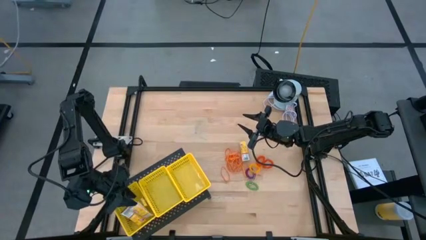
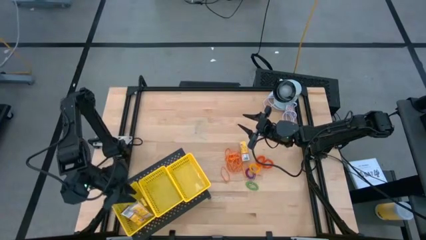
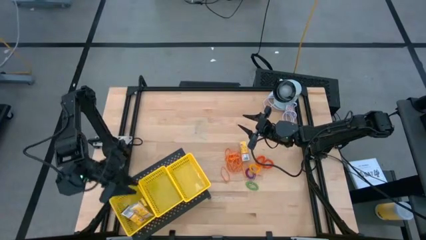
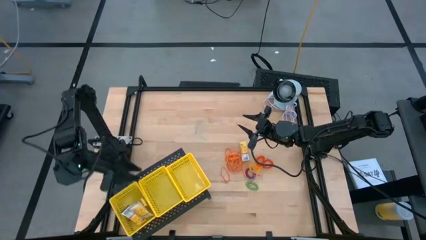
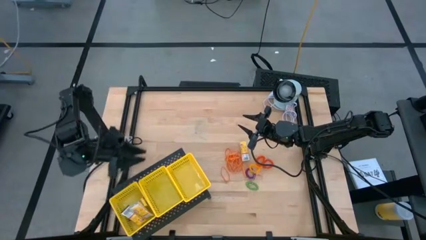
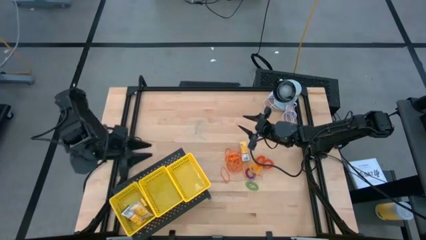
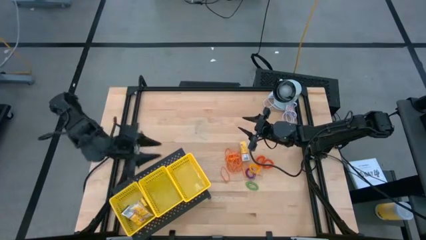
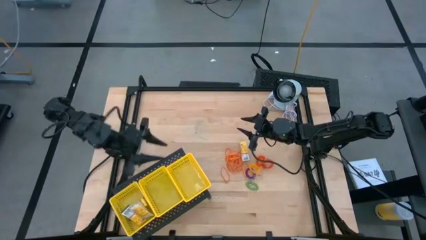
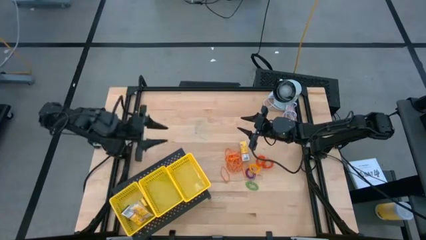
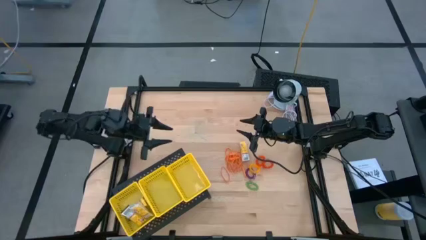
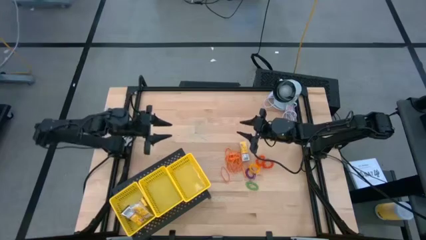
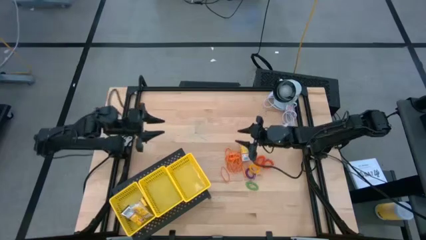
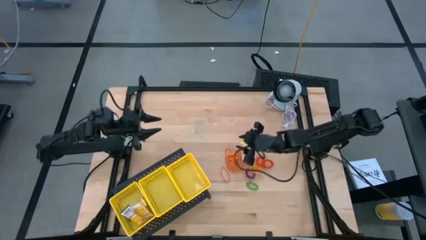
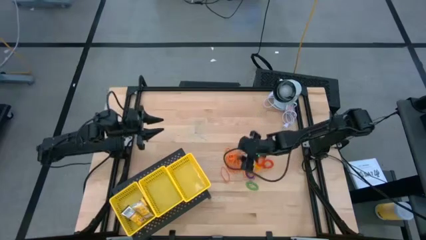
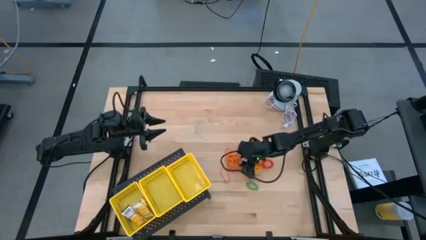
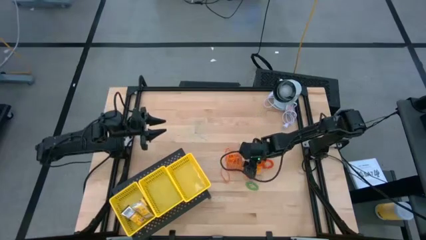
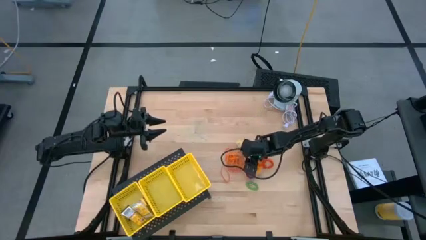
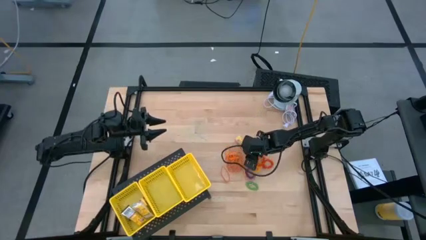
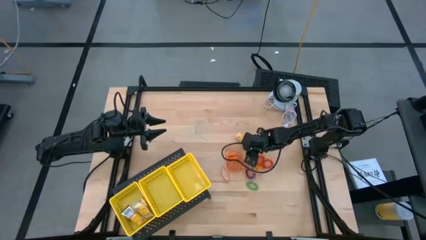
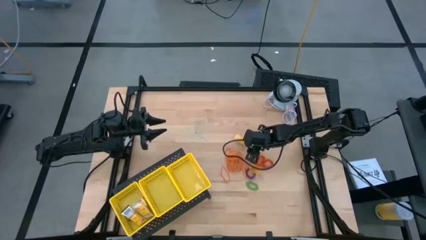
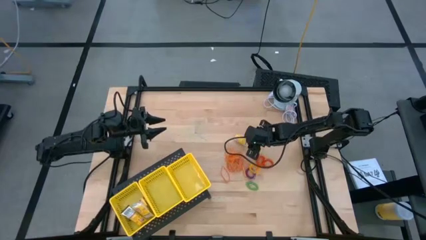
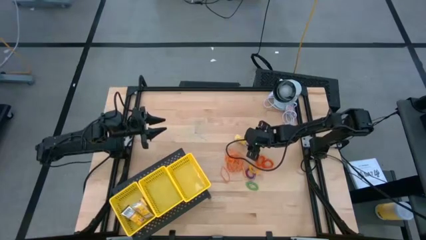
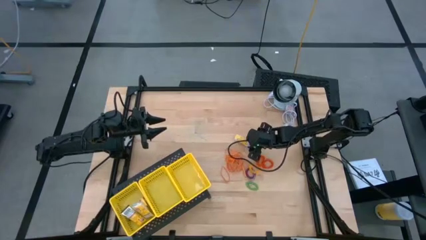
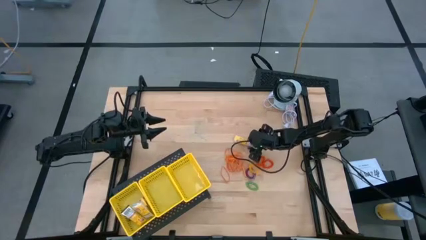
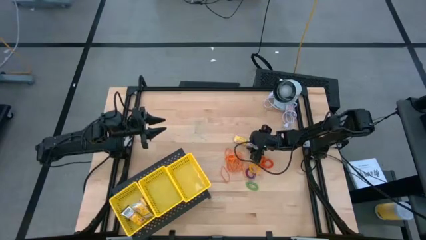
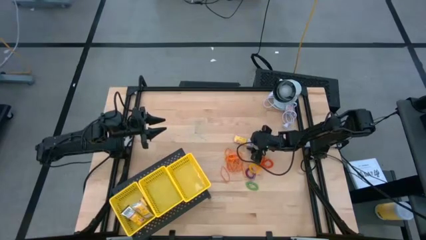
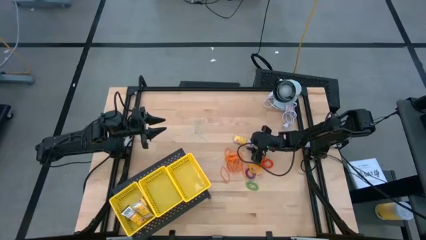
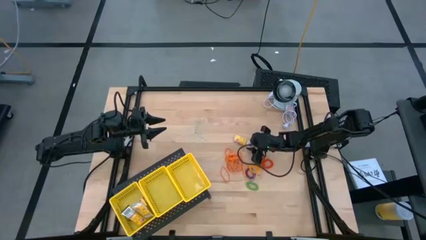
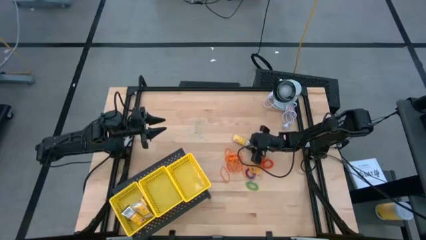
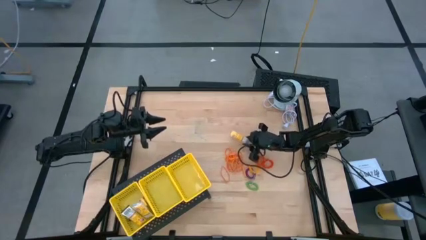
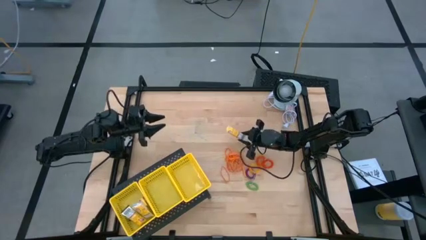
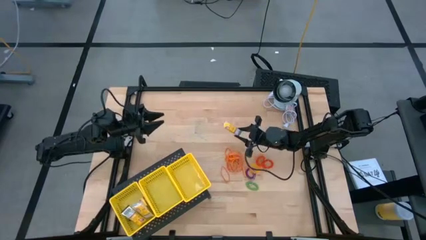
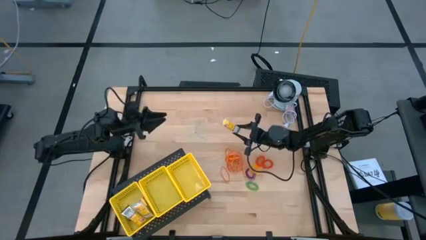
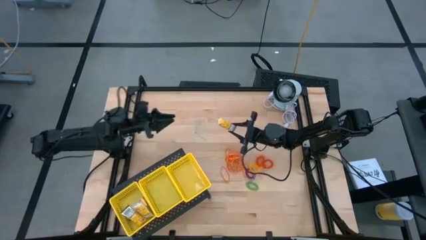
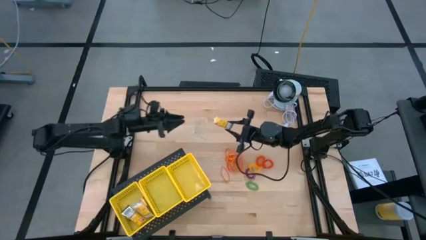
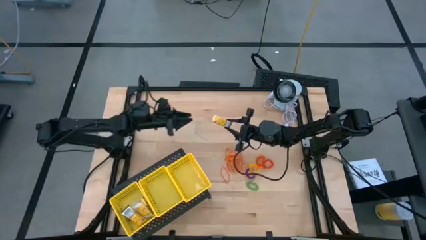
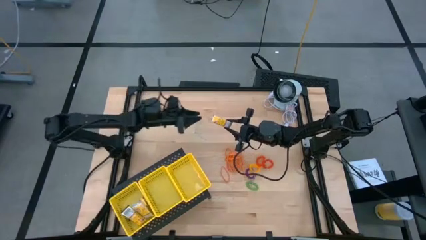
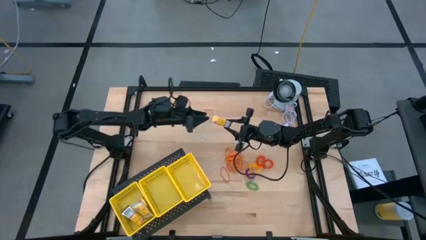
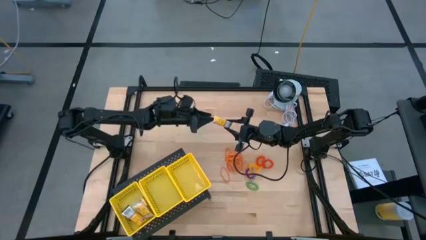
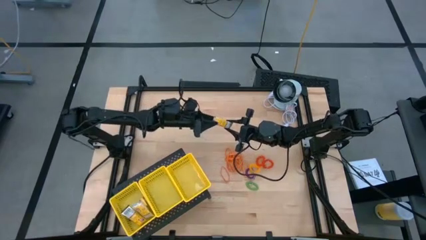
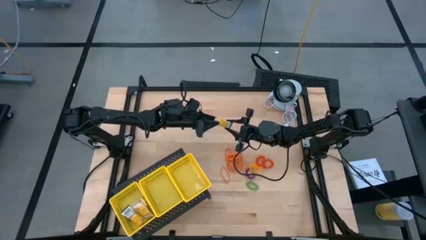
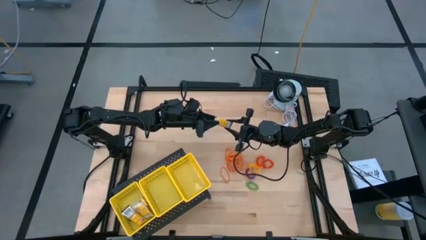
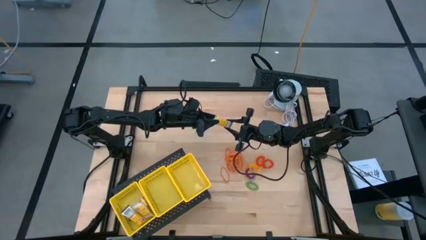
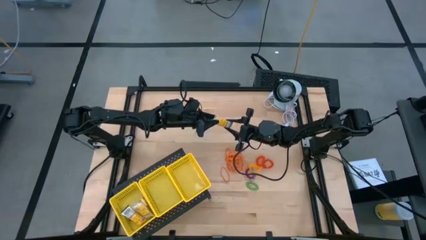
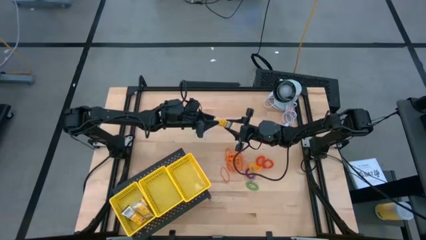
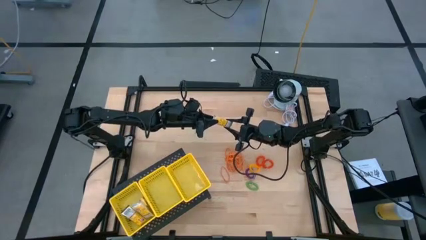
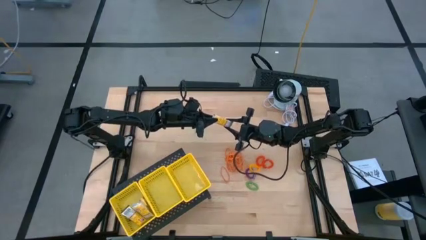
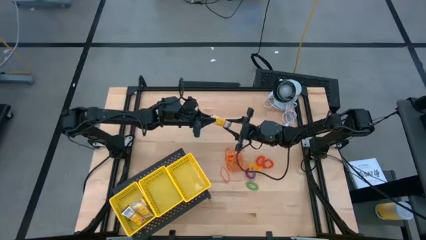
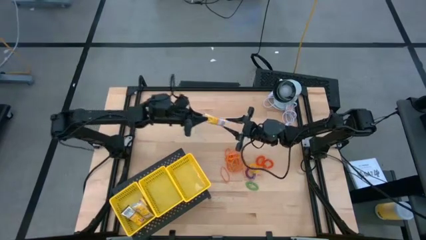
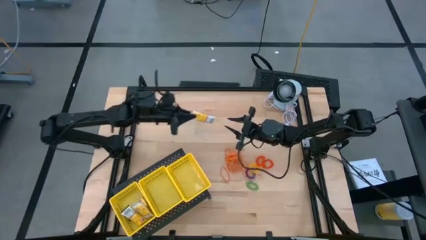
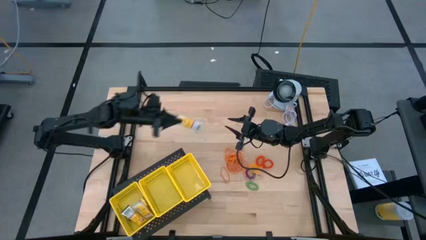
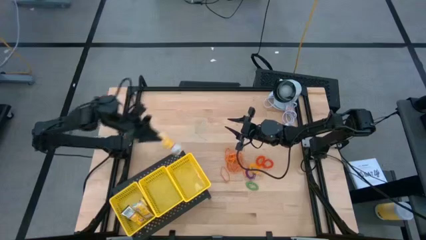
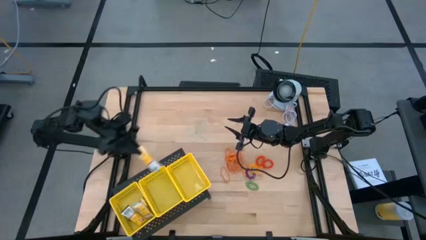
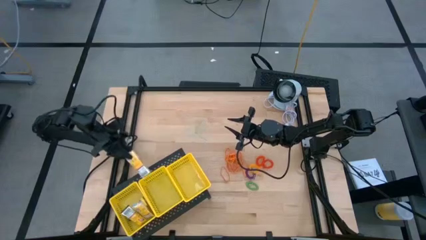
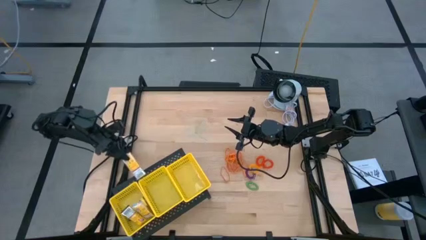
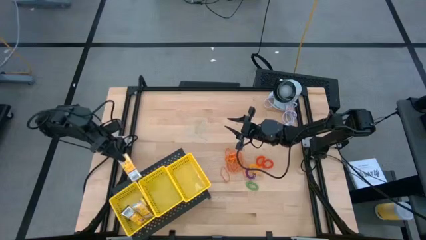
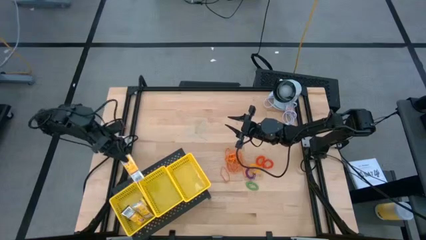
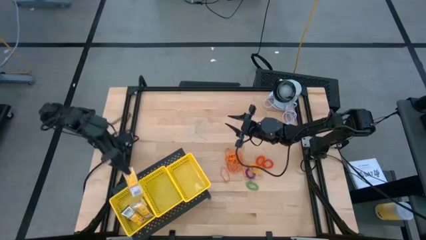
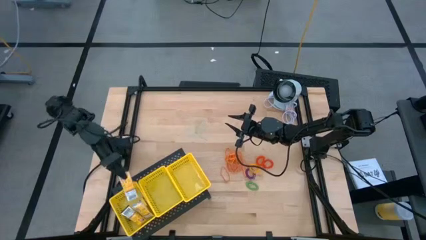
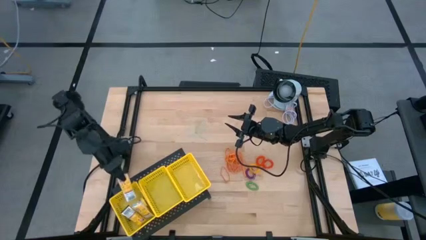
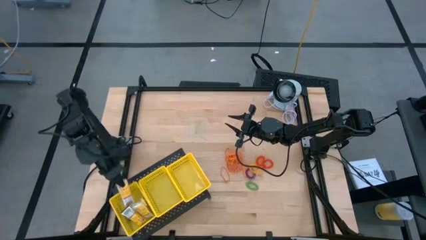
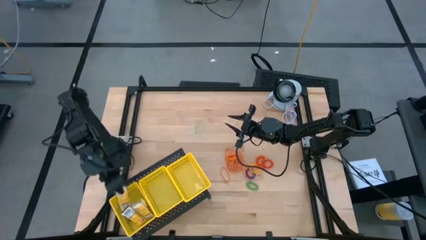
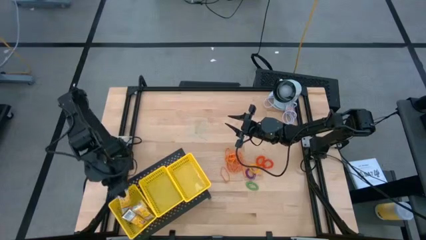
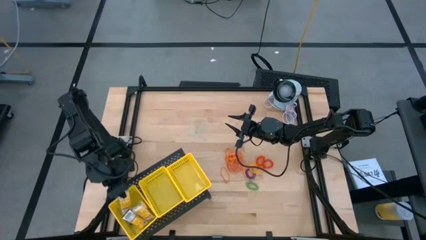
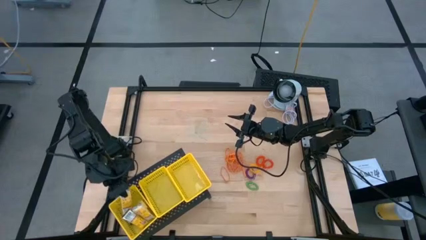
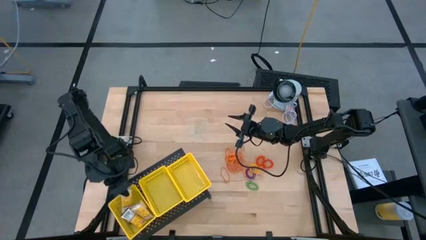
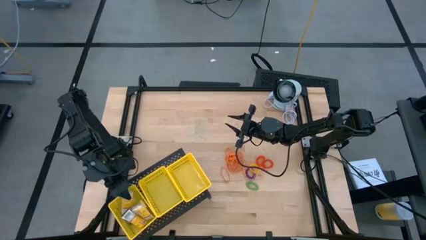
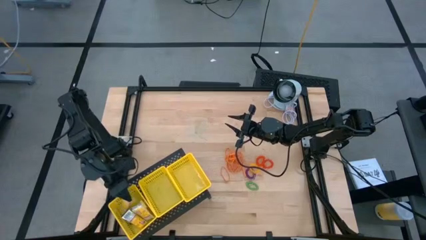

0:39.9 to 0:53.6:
Task: Pick & Place Office Desk Supplies
Put the crayon box into the left yellow bin on the shelf
